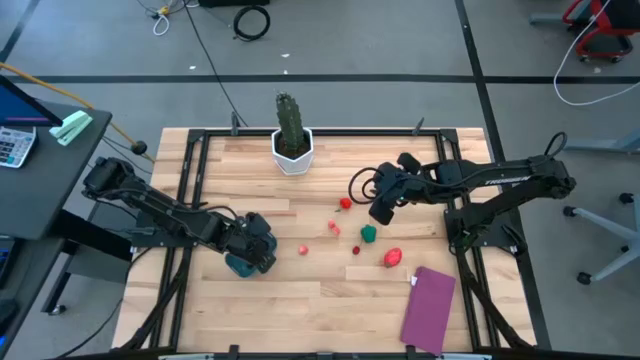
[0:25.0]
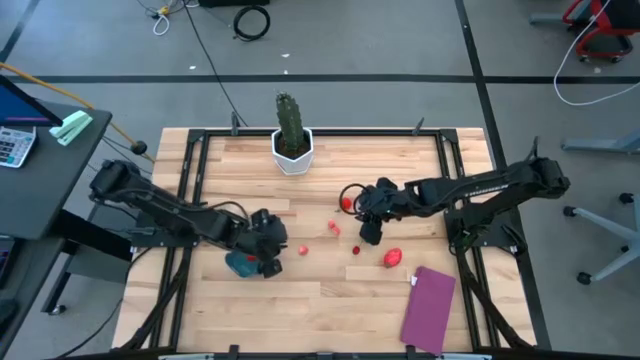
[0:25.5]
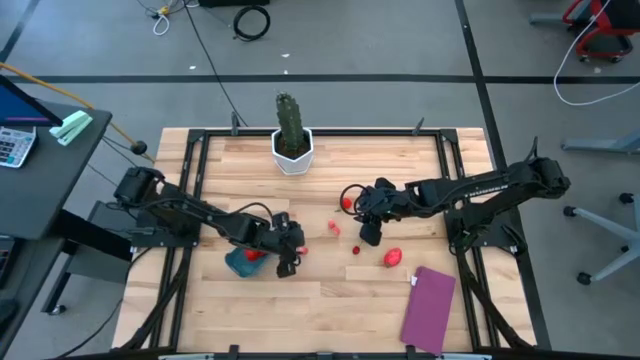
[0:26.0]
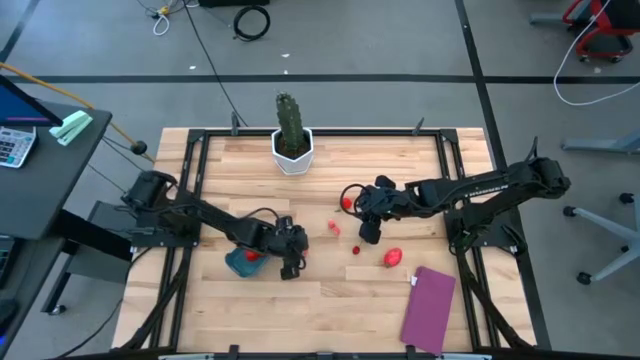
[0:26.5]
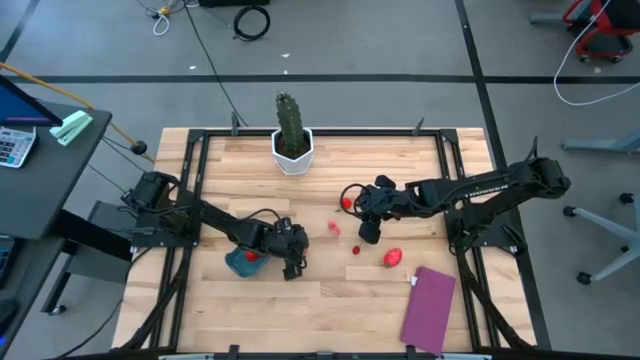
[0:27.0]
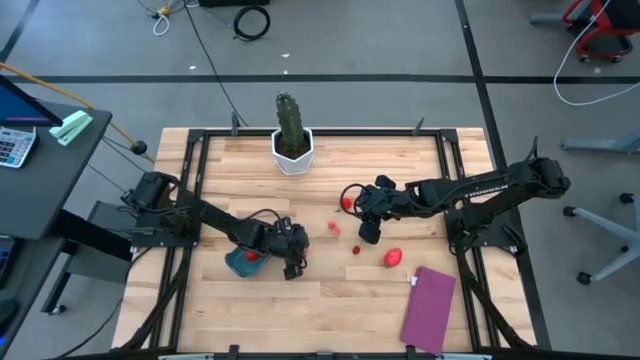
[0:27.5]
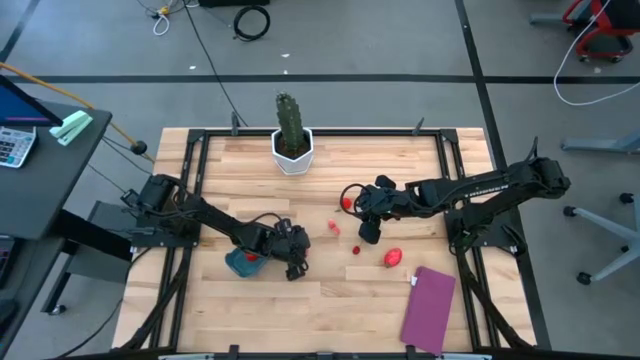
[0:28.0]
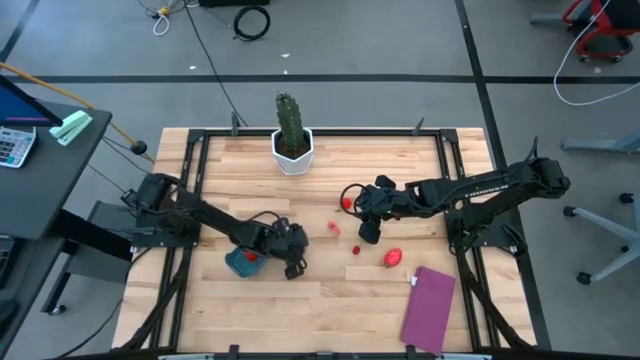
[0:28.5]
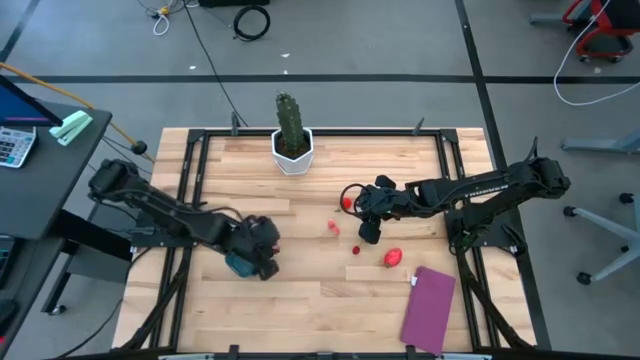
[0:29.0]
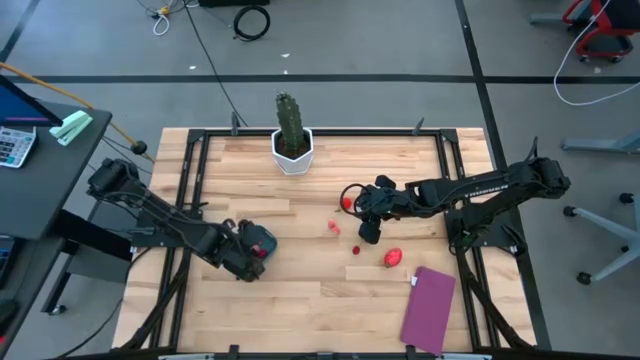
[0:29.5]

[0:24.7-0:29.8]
Task: Pick and placing Produce into tupperware
Put the bottom pink peach into the blue bin

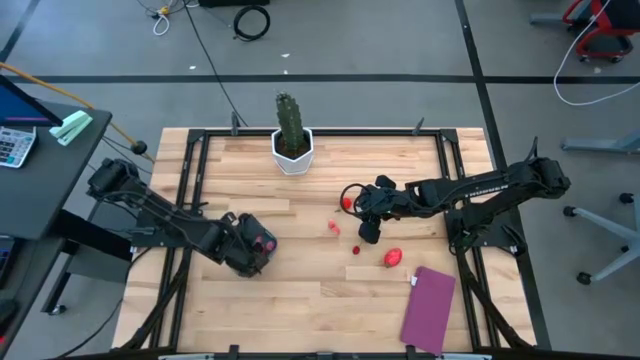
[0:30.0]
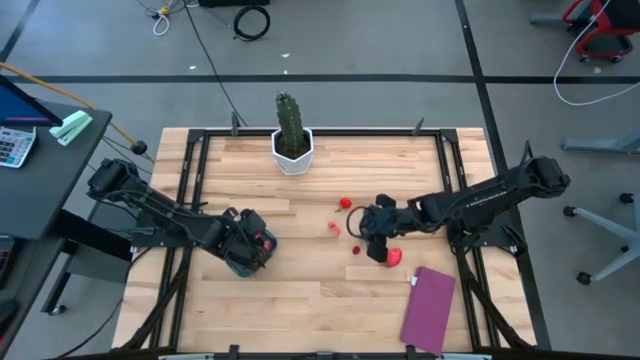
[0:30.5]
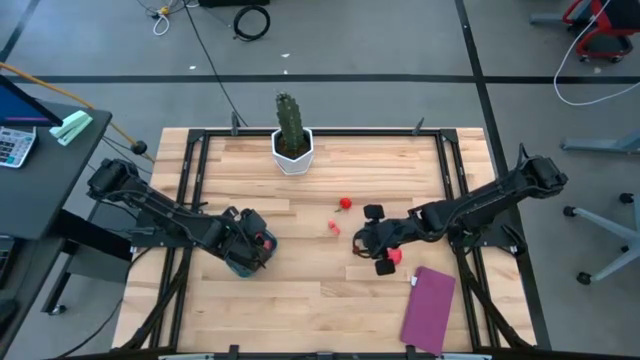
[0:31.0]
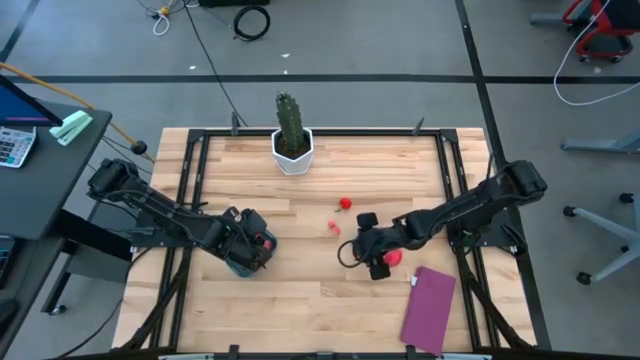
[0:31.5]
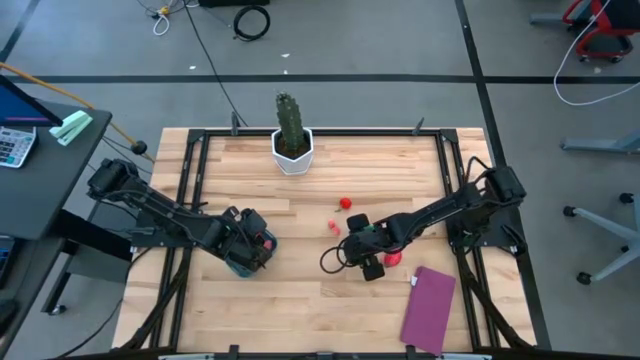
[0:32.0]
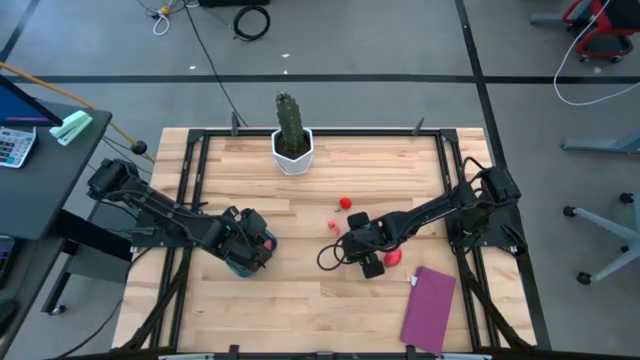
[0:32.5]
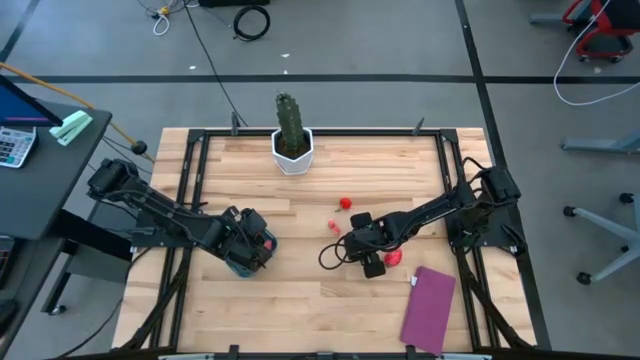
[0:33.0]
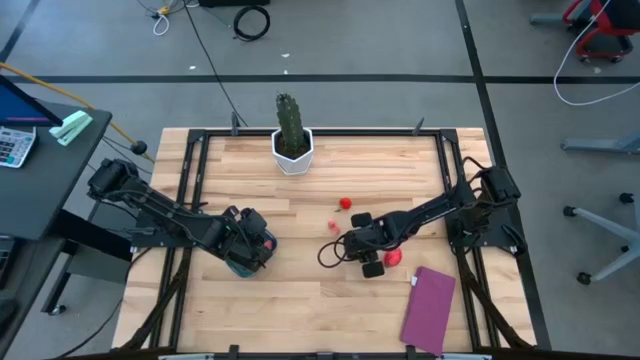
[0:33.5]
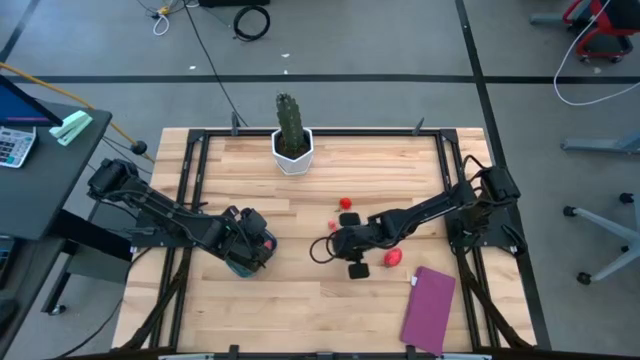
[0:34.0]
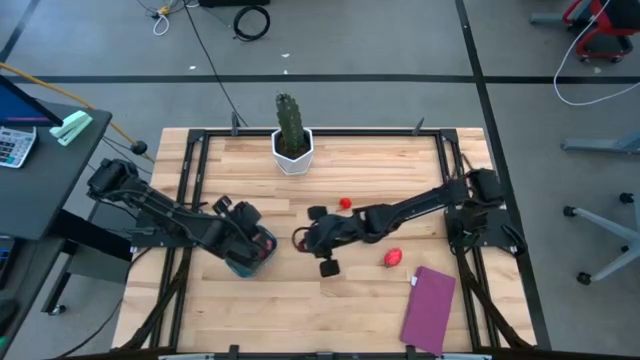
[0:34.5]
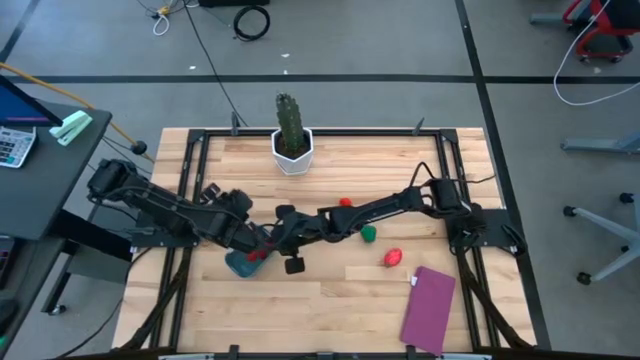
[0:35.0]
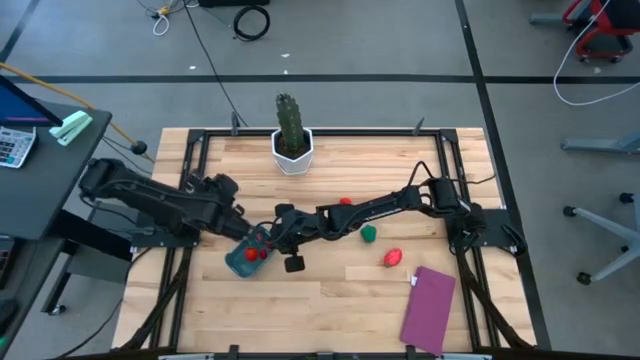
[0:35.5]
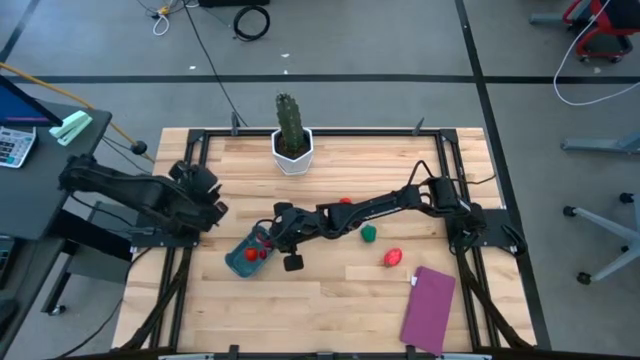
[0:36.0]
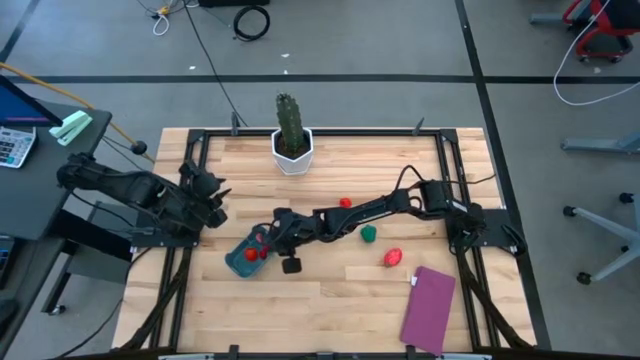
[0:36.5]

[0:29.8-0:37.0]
Put the red cherry into the blue bin

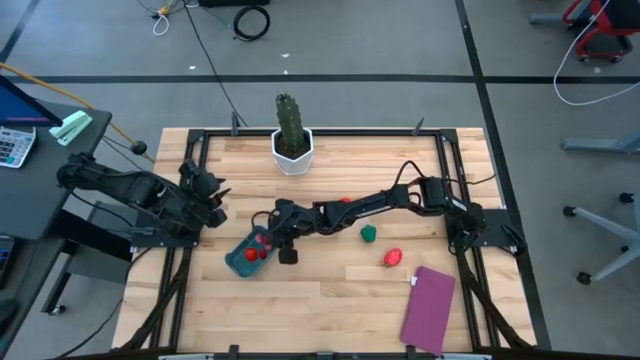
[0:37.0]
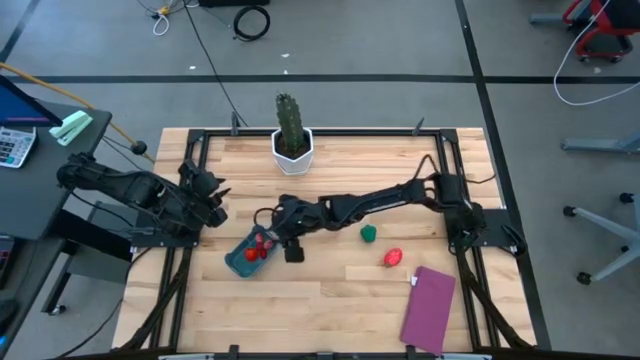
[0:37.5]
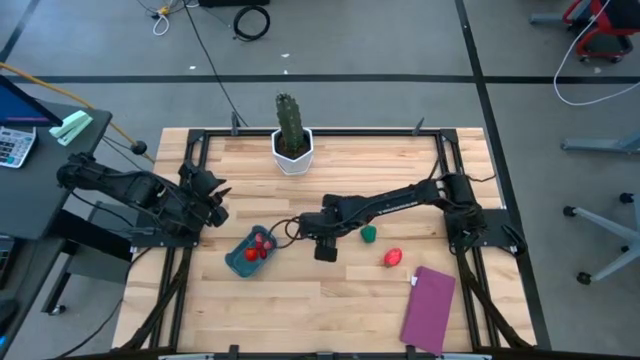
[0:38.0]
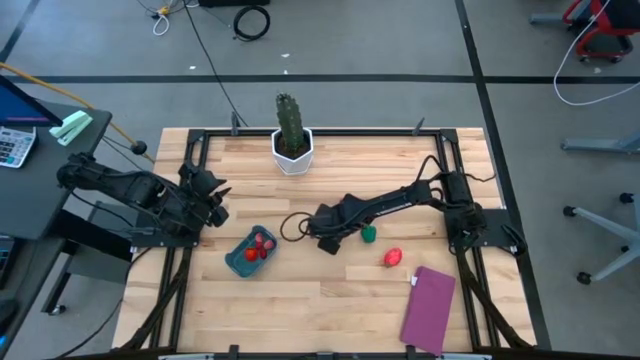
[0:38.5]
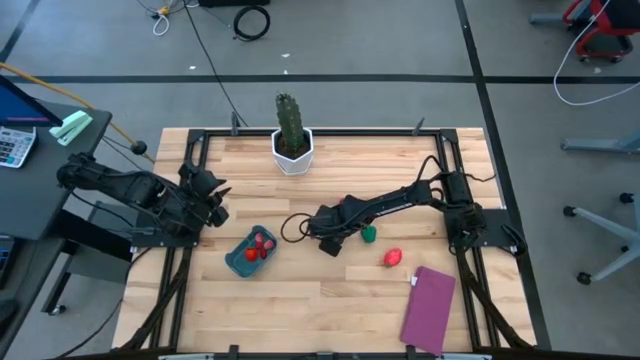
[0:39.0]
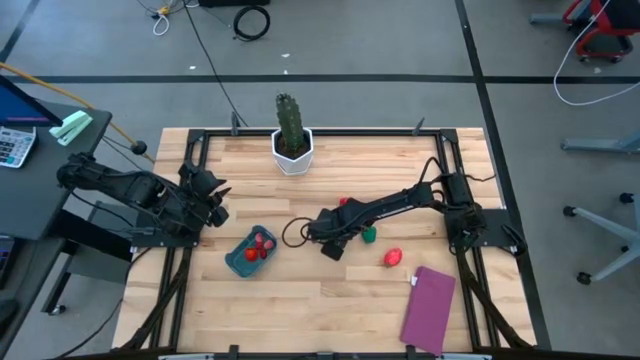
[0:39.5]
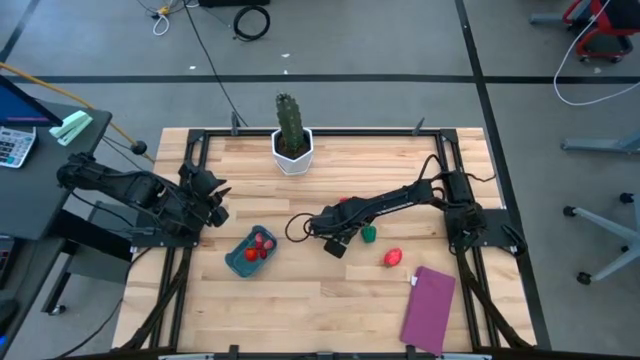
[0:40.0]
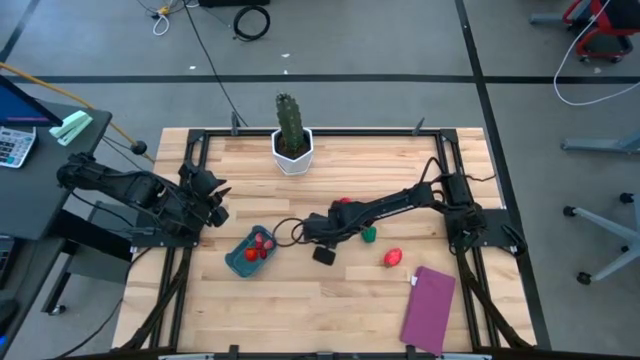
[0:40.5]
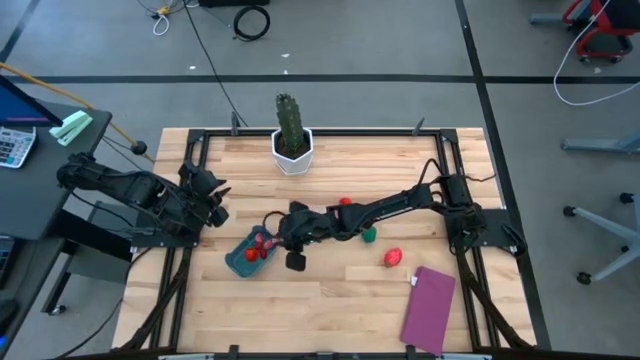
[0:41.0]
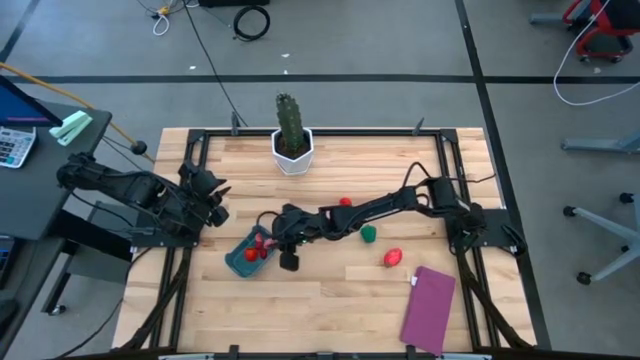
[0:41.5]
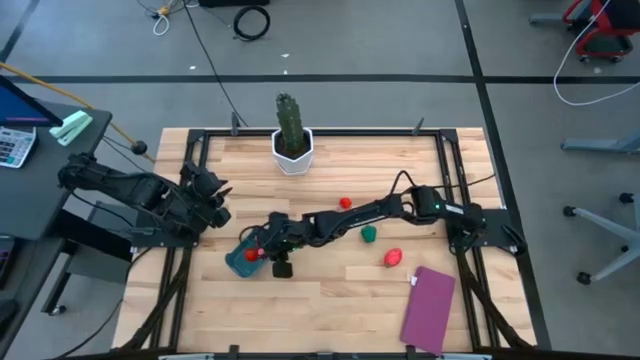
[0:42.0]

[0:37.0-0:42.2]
Put the bottom pink peach into the blue bin

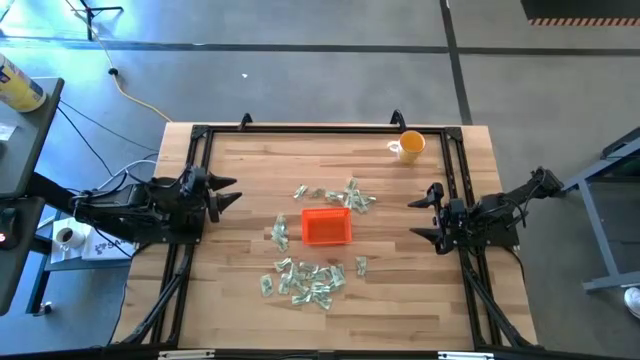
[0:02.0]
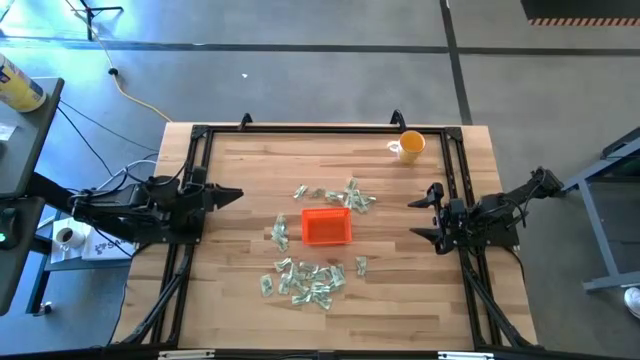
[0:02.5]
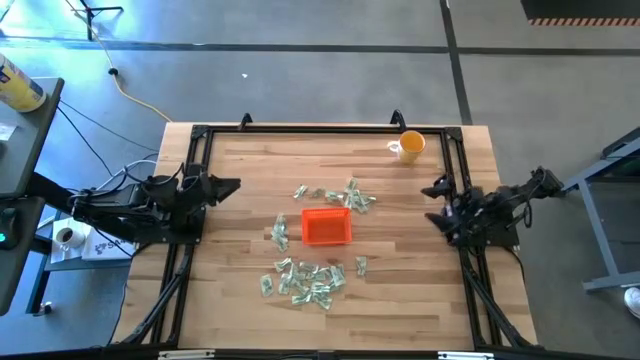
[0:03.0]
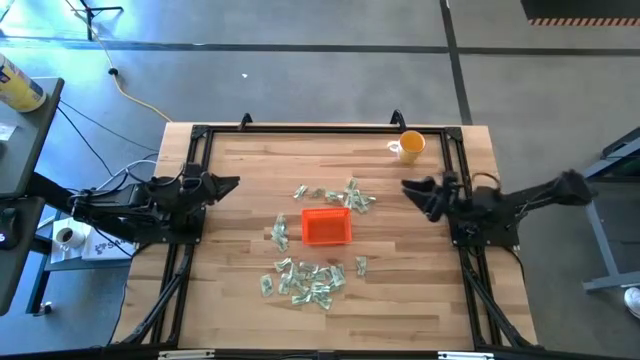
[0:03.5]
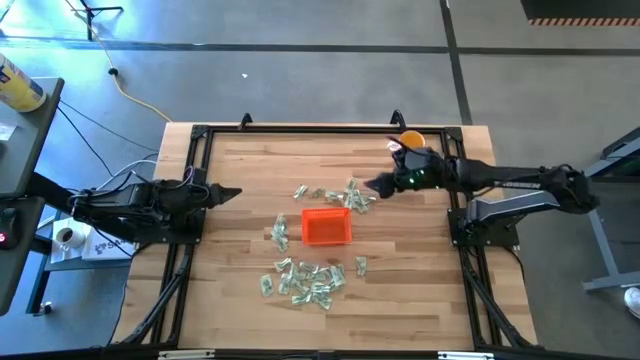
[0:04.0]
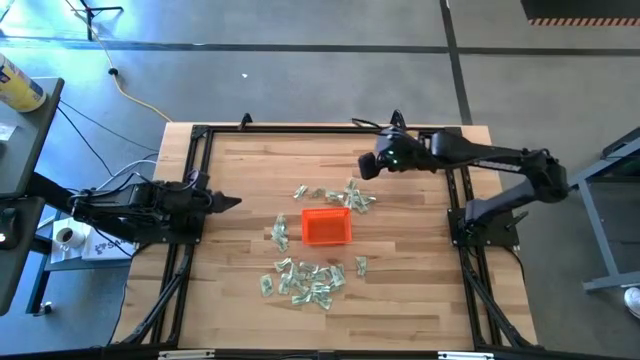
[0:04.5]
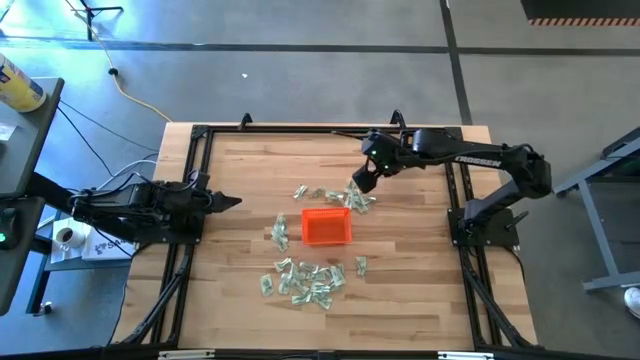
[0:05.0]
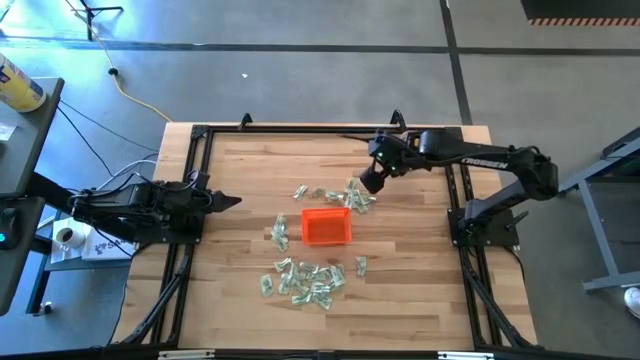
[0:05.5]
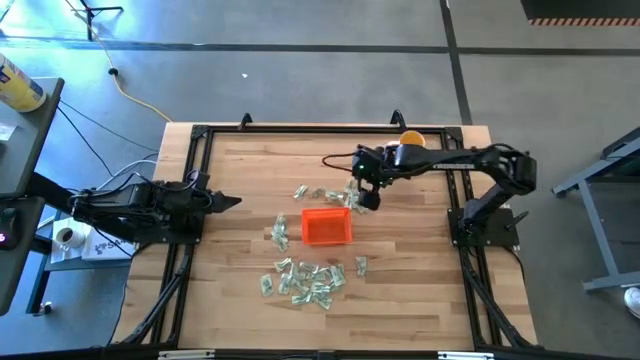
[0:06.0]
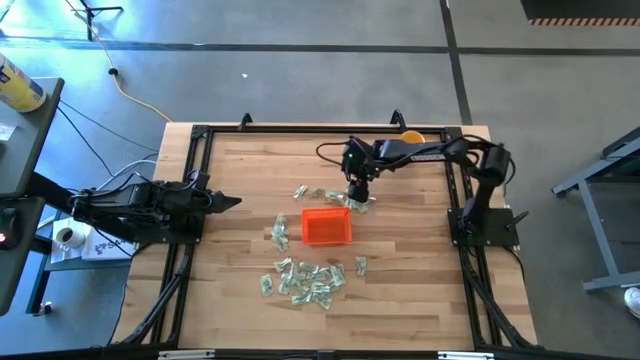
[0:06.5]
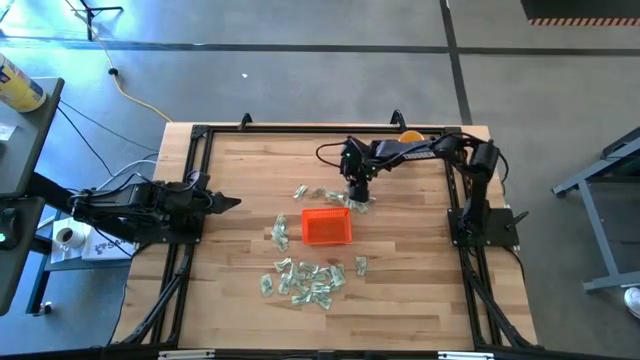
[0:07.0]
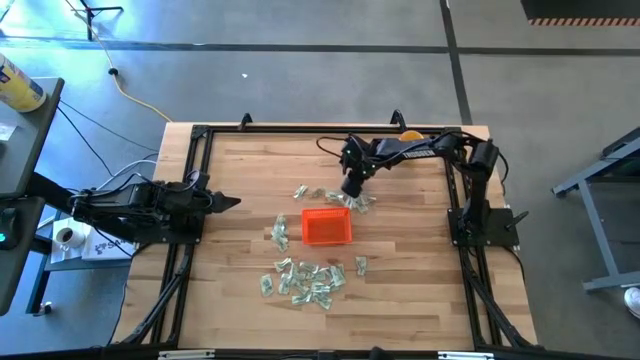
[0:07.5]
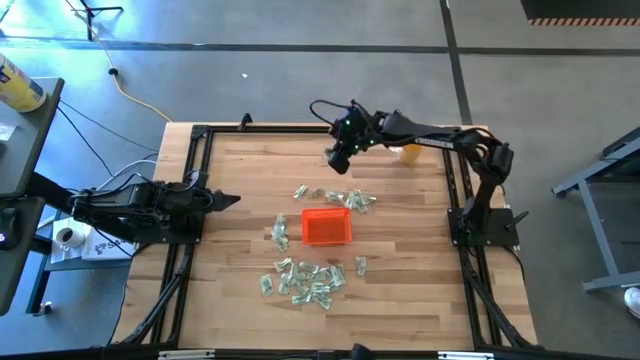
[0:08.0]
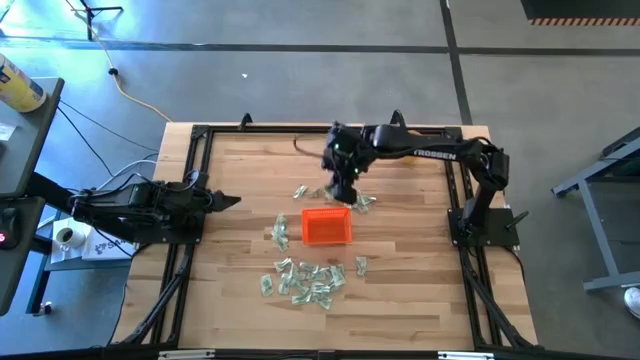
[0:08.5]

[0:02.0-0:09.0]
Task: Pick and place Stevia / Truvia into bins
Put the stevia packet into the orange bin
